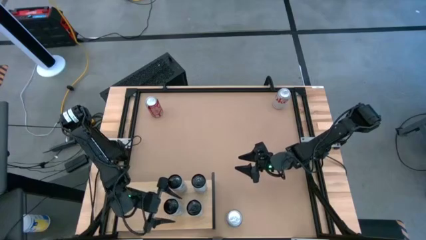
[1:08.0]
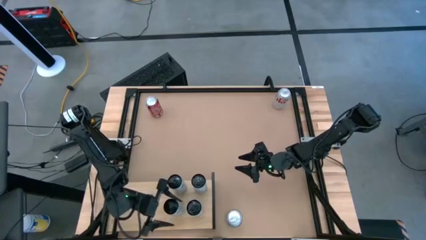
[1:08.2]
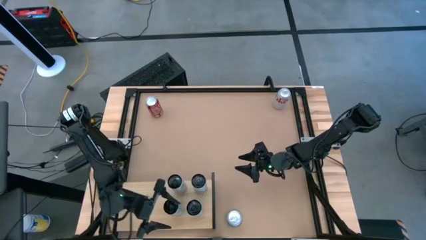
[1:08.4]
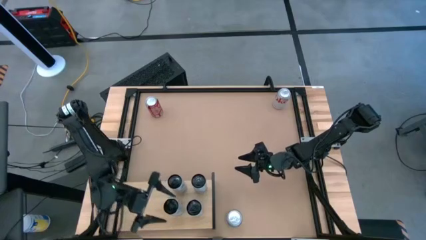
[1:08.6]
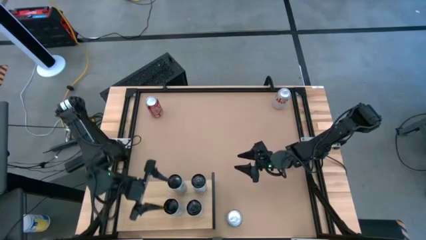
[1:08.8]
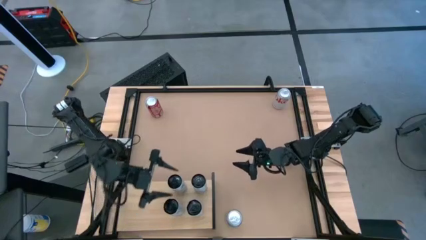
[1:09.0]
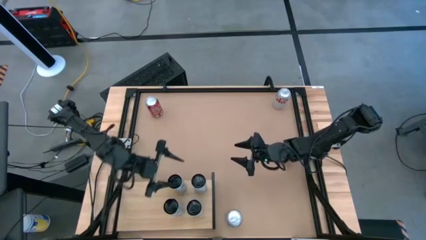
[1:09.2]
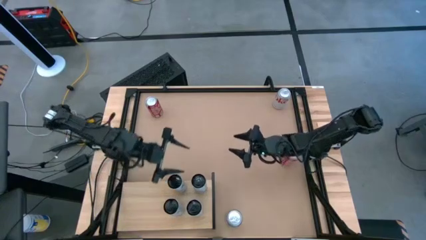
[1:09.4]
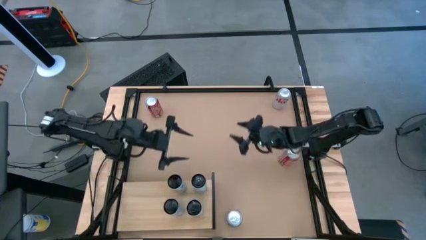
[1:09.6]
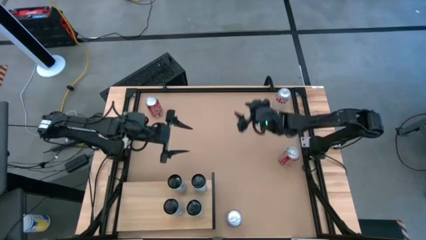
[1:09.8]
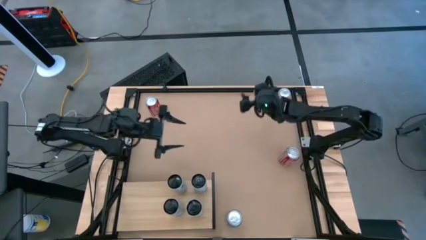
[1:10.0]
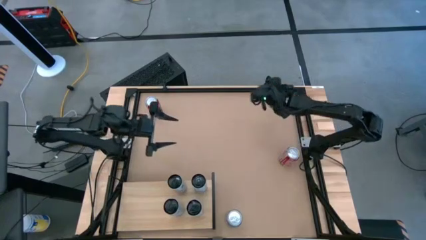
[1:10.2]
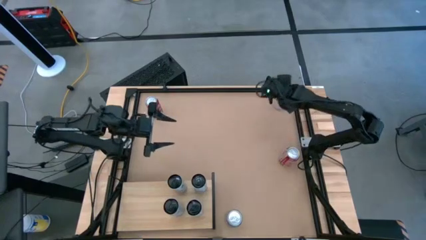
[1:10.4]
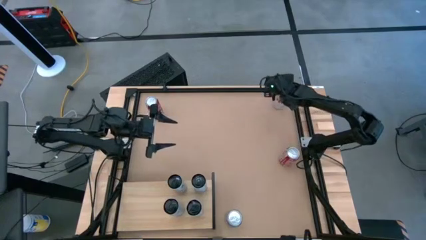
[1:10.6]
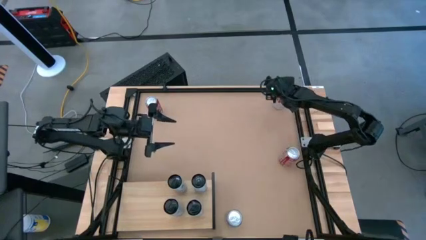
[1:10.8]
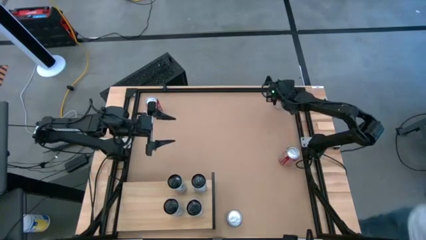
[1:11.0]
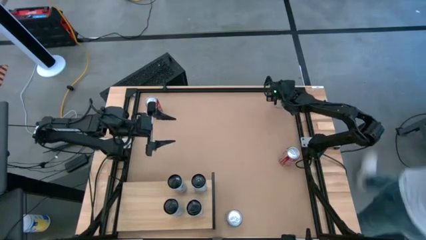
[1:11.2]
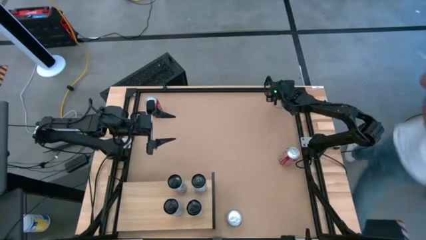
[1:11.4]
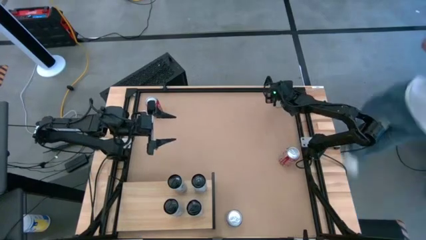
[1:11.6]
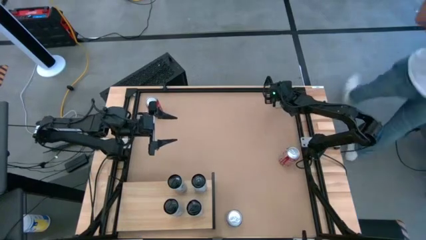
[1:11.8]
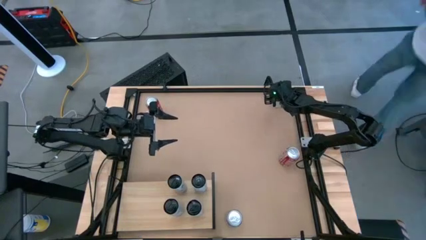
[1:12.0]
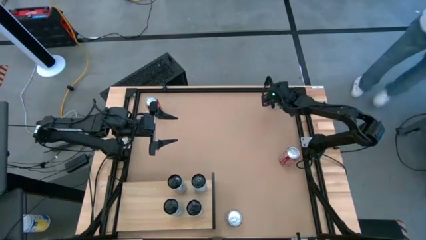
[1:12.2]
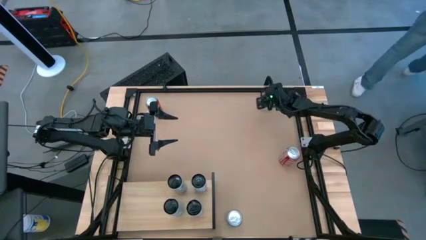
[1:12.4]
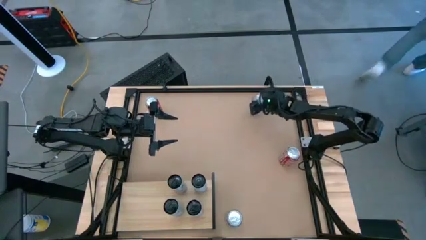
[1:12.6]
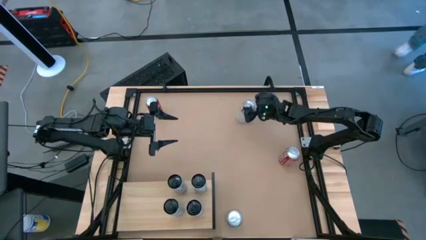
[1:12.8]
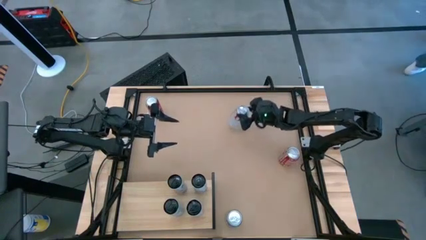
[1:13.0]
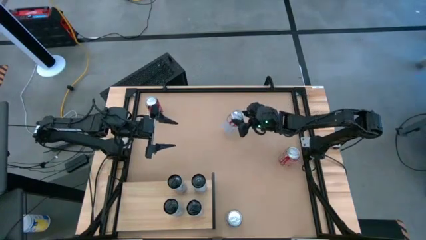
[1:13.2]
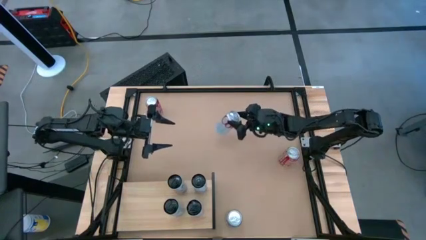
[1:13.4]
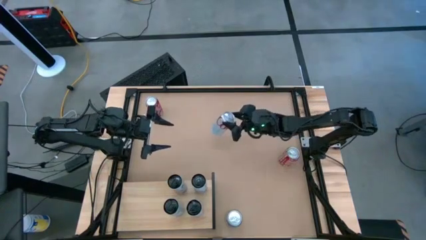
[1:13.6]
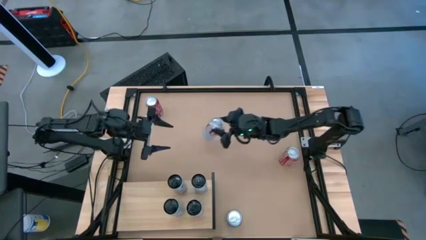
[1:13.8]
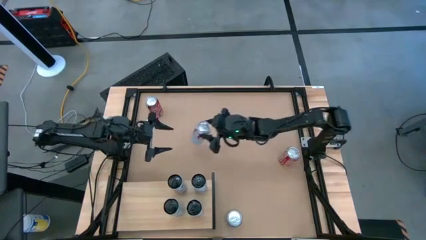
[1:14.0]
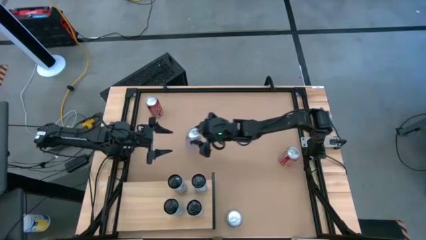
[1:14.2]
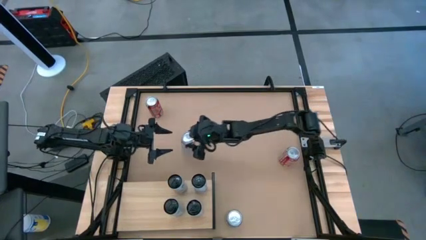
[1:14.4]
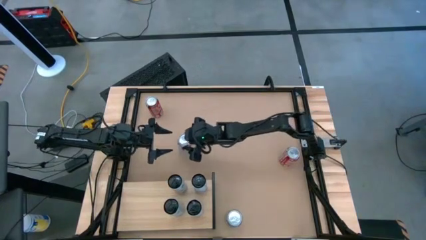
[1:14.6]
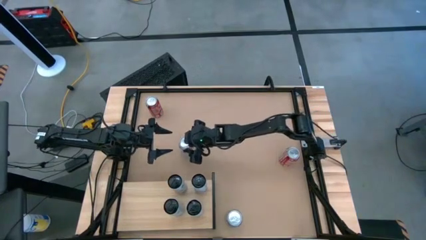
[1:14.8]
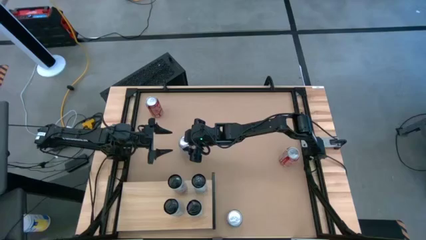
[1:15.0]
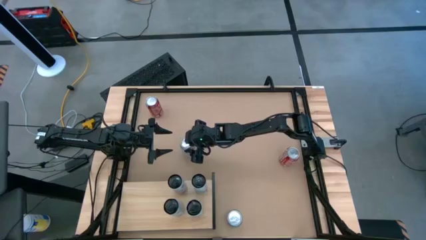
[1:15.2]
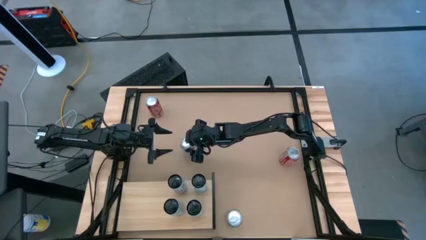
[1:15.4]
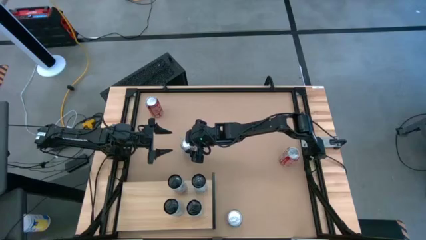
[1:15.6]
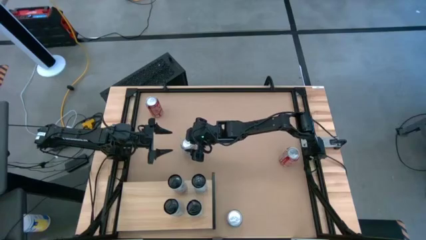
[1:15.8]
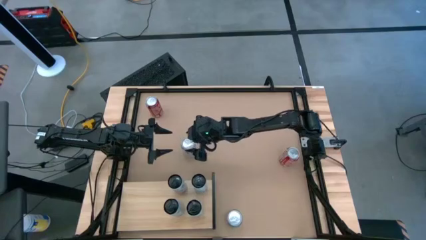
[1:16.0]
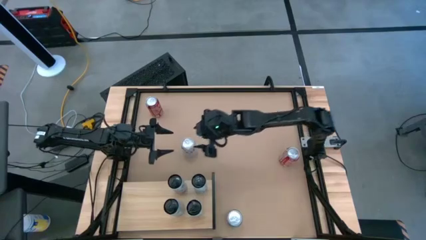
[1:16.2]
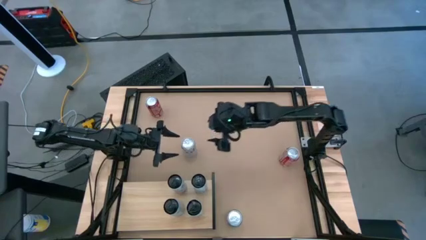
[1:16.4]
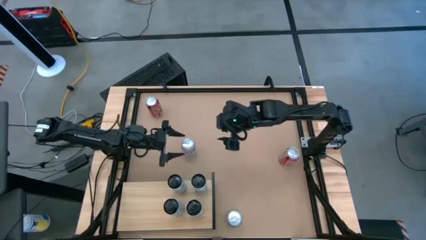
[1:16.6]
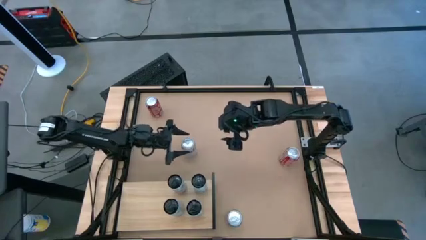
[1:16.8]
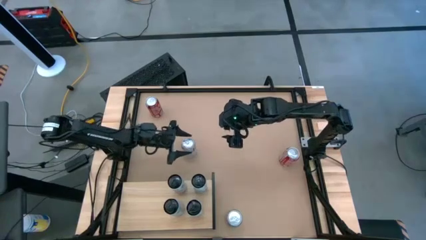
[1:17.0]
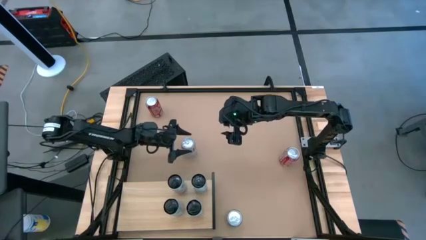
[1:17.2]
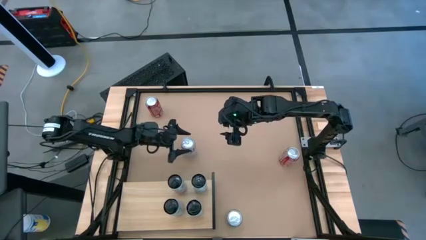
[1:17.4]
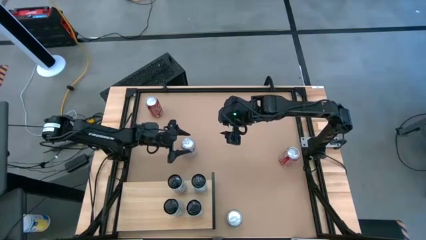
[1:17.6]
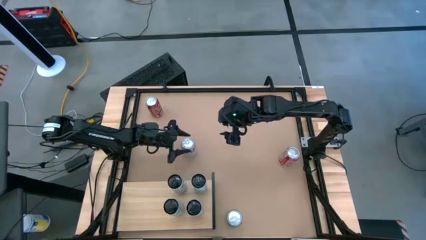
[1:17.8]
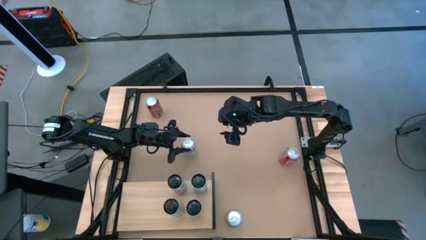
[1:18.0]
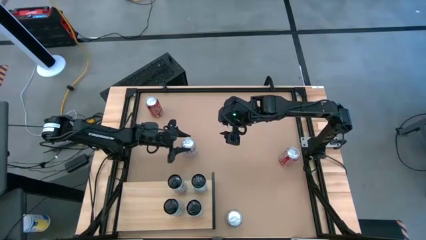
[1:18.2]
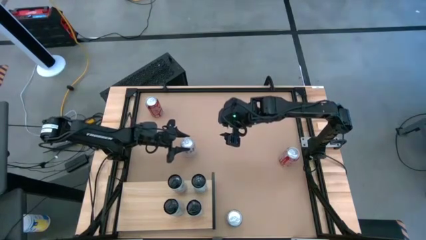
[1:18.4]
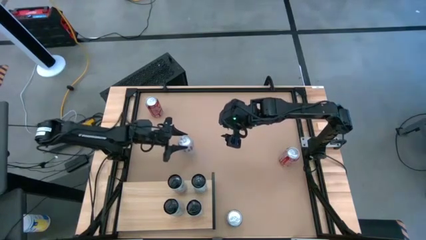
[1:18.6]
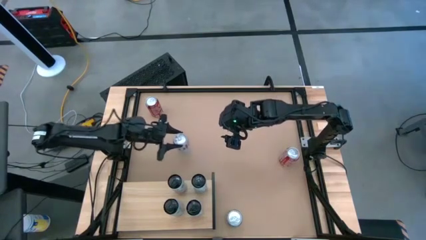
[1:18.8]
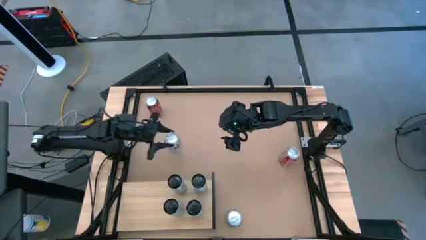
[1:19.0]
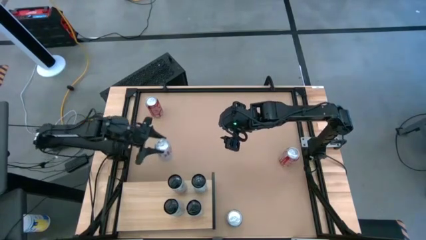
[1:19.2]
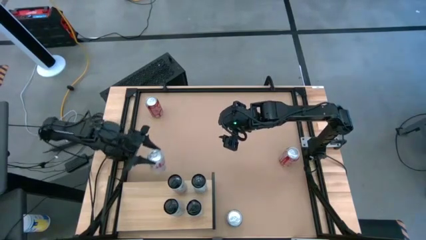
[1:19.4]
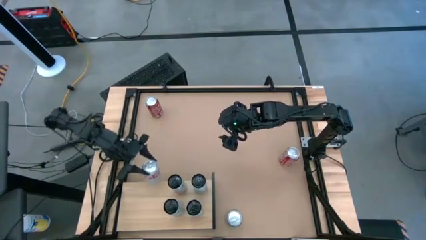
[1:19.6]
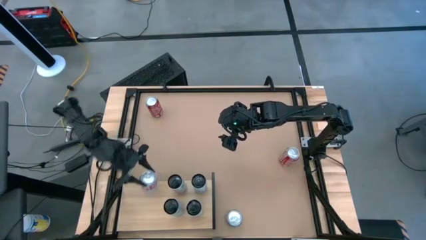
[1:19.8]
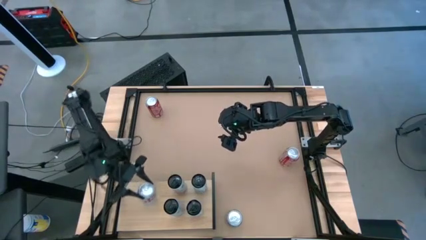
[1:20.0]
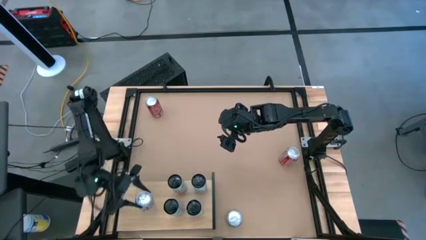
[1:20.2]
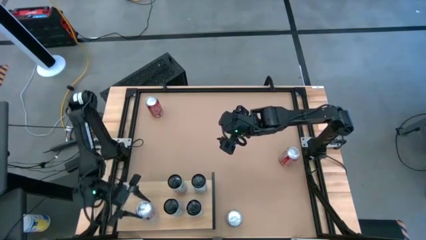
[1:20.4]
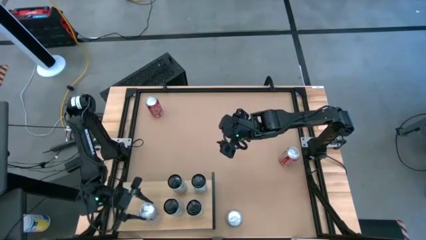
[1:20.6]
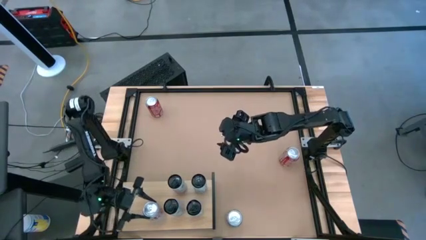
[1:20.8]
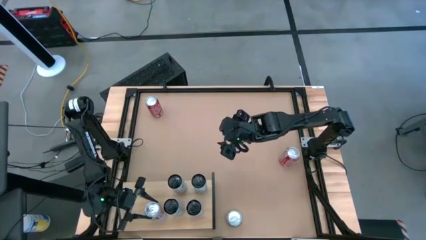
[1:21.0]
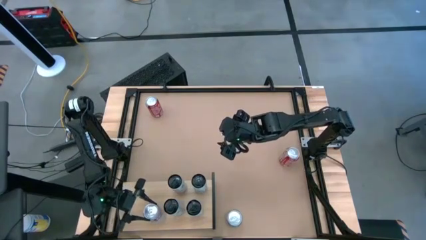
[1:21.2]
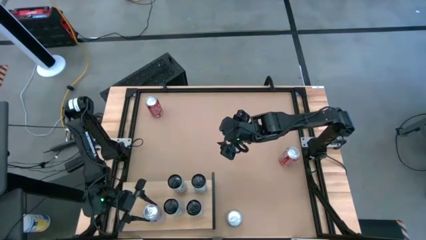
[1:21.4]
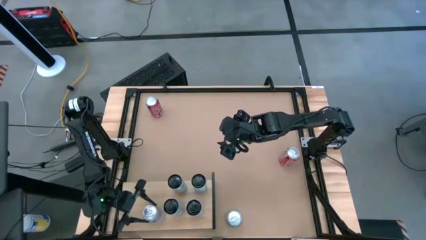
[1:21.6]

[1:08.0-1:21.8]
Task: Place canned beverage on shelf
Put the top silver soda can on the shelf
